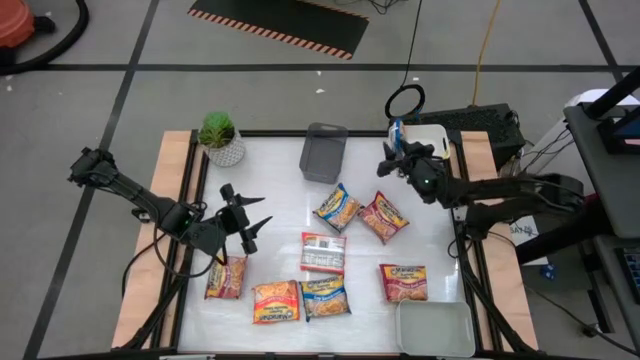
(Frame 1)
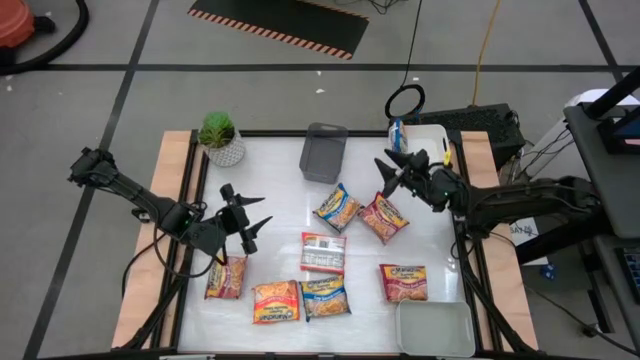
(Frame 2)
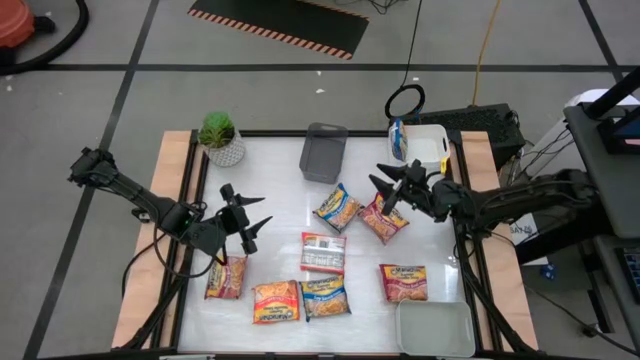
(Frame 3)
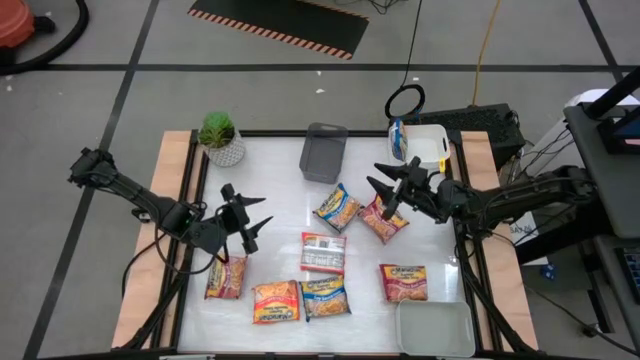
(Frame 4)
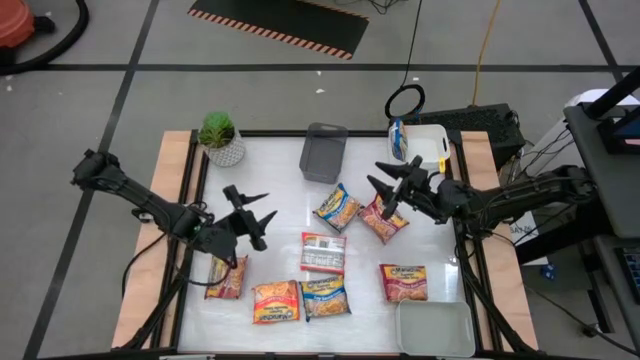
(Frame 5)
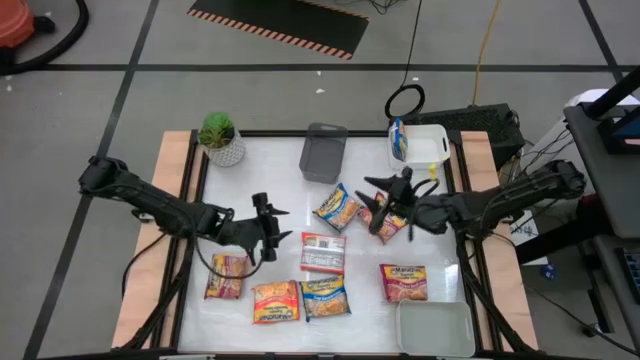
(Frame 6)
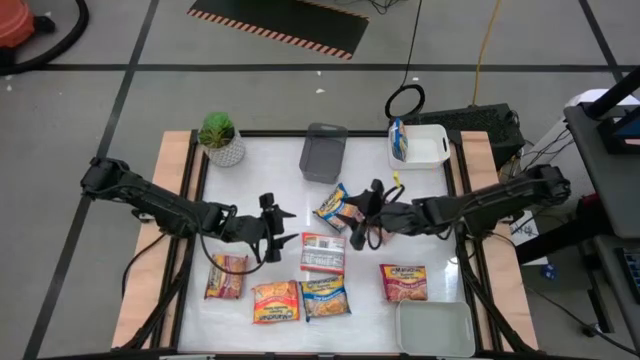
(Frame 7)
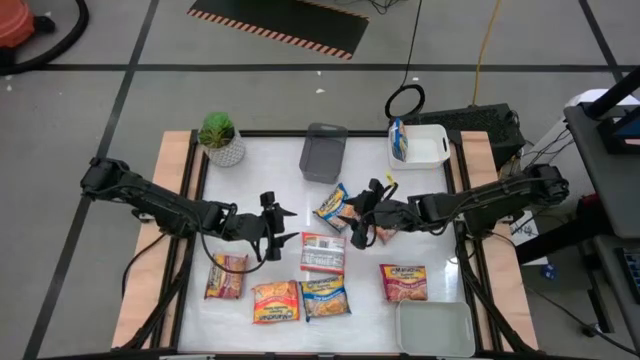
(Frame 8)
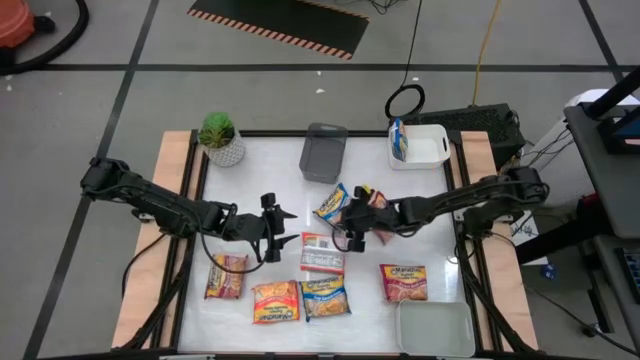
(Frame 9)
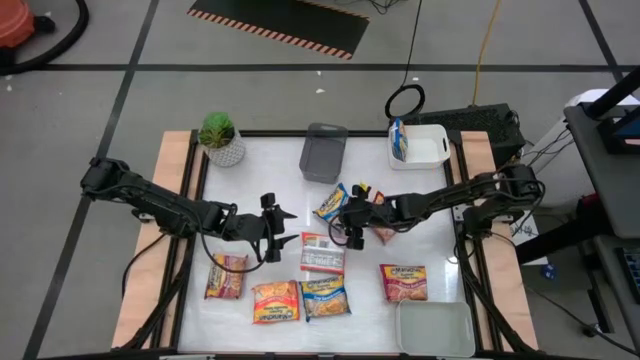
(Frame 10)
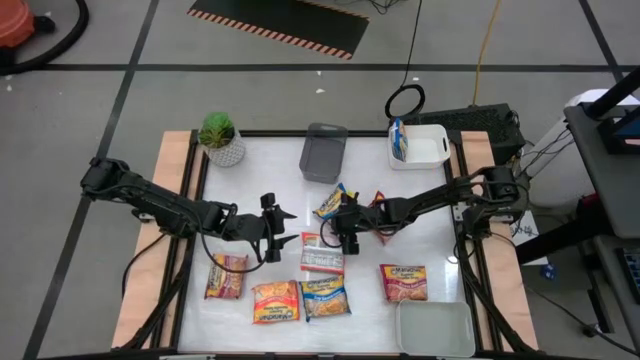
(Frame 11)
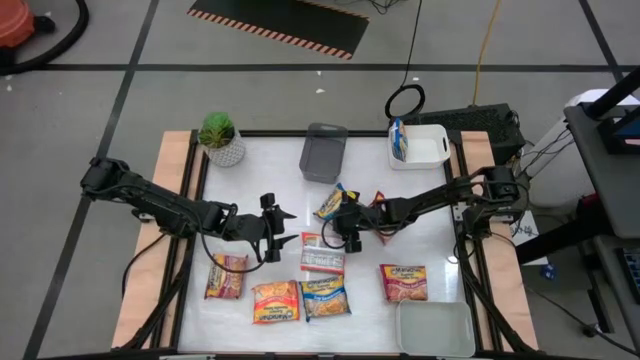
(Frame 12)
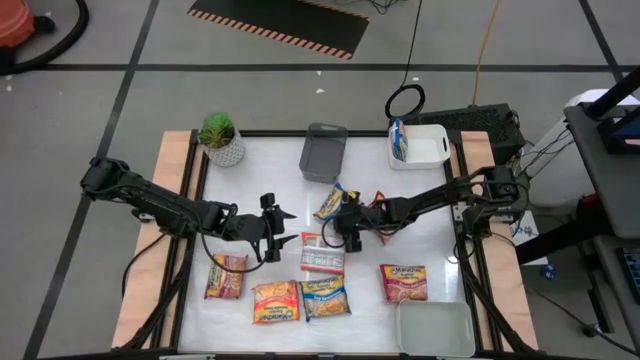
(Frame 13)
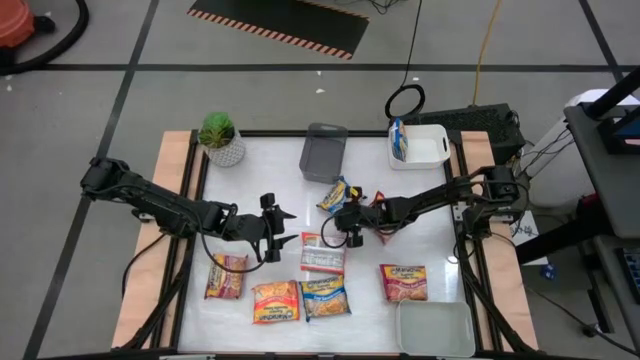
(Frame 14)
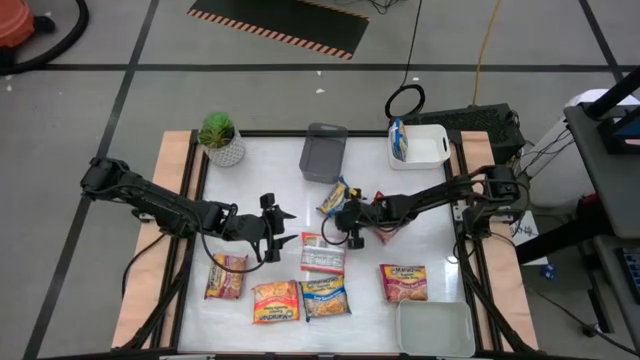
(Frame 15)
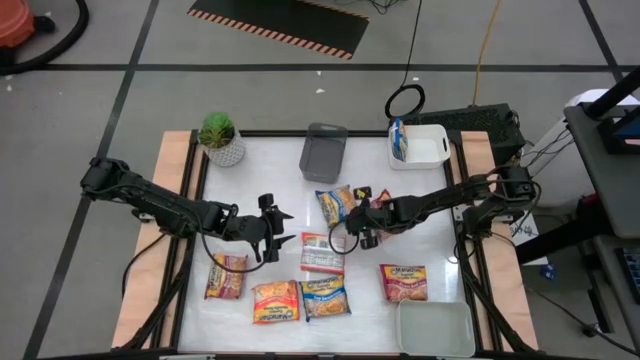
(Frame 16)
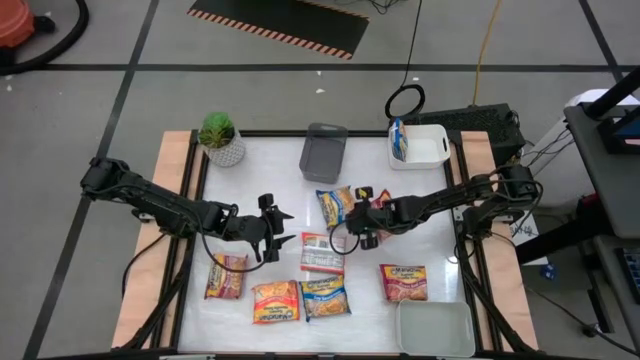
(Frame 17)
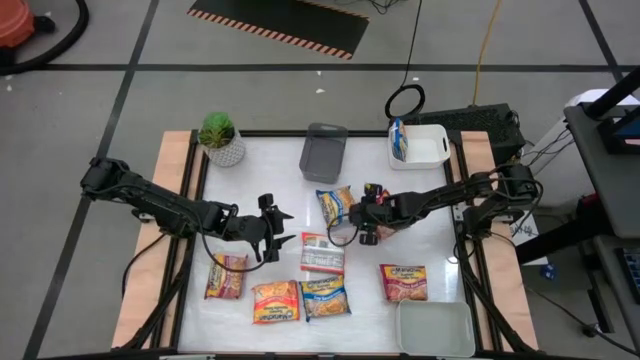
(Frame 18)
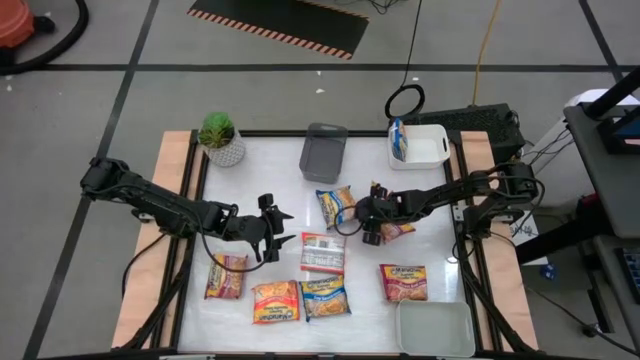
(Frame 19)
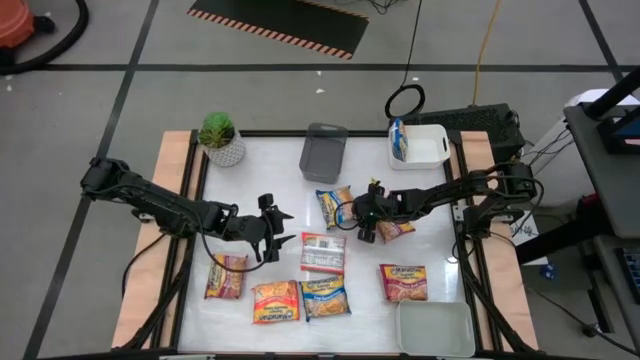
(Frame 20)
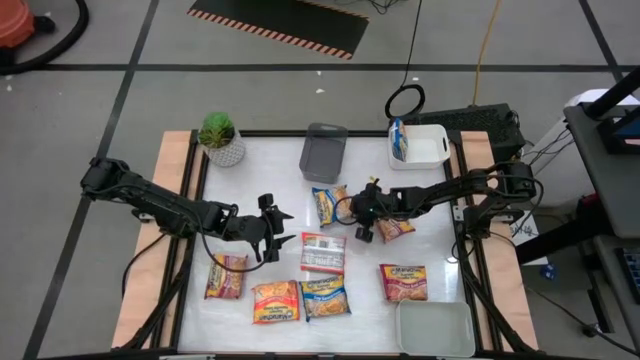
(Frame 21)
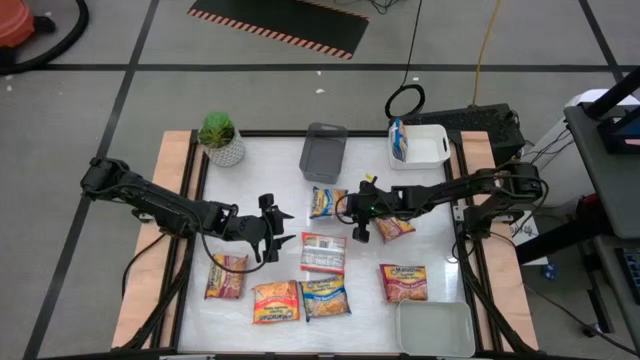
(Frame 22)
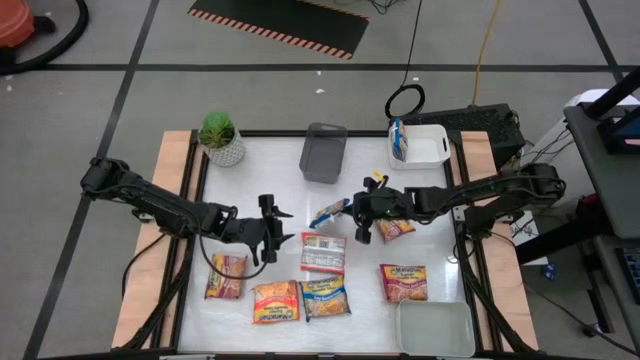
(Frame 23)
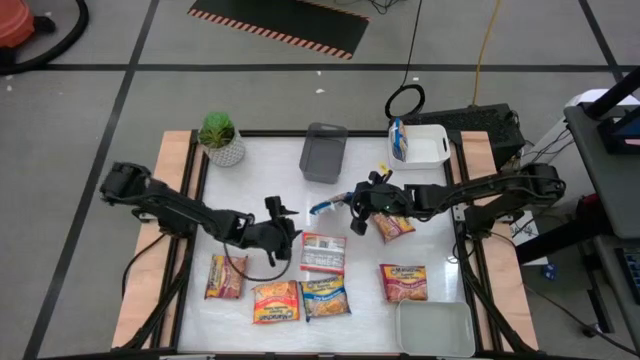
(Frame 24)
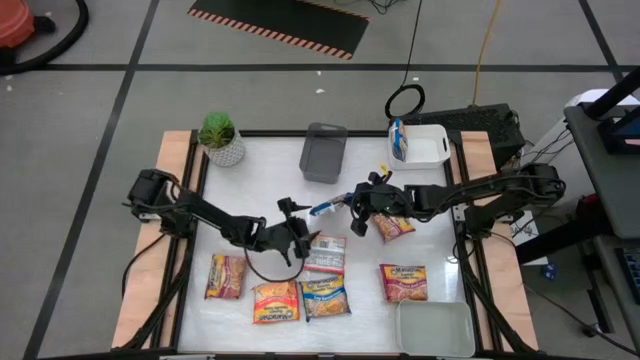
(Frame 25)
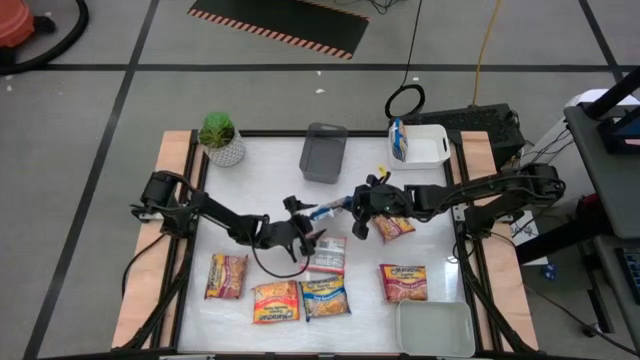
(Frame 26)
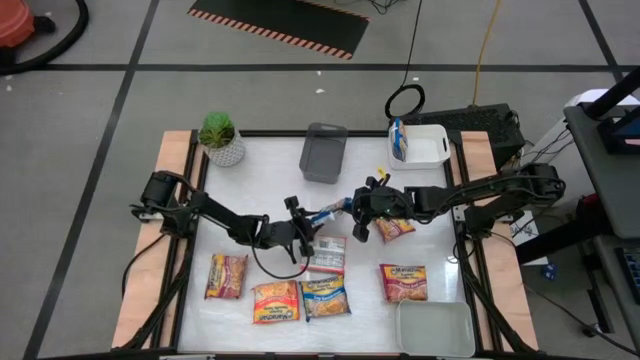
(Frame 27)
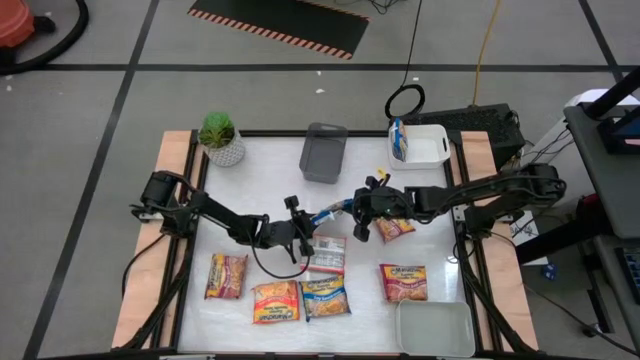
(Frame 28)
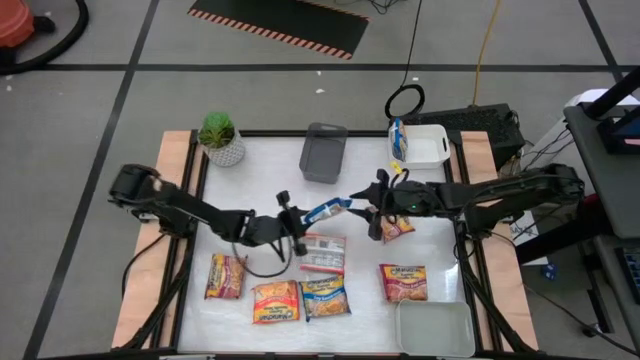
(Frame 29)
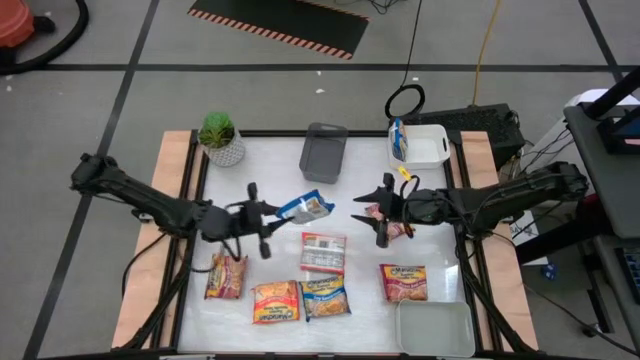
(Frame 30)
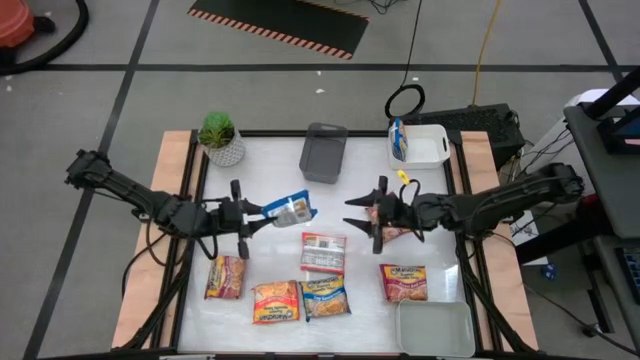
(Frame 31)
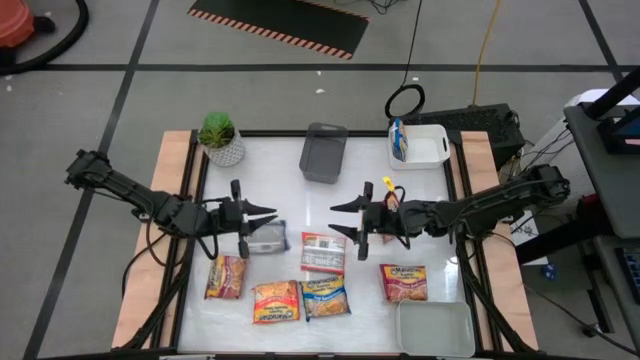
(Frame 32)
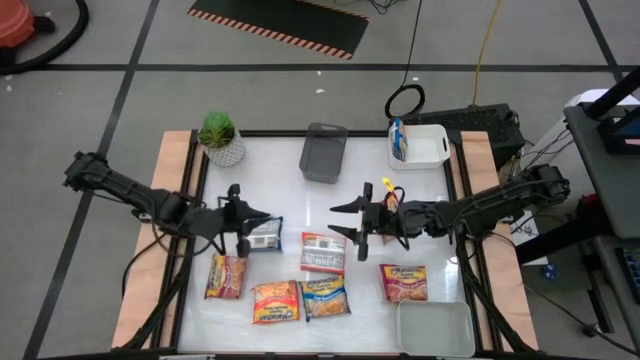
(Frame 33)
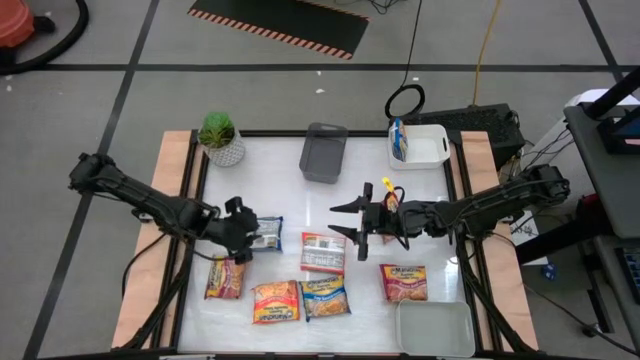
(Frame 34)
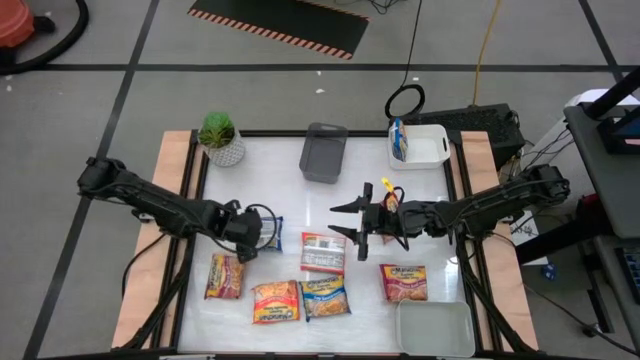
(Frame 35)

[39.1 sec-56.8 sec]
Task: Sort Maruchan noodles
Put the top blue noodle pack into the white bin

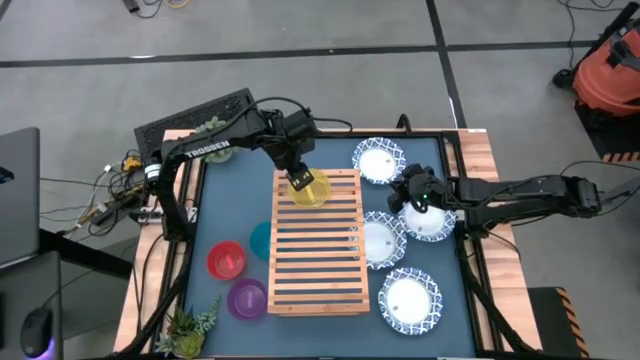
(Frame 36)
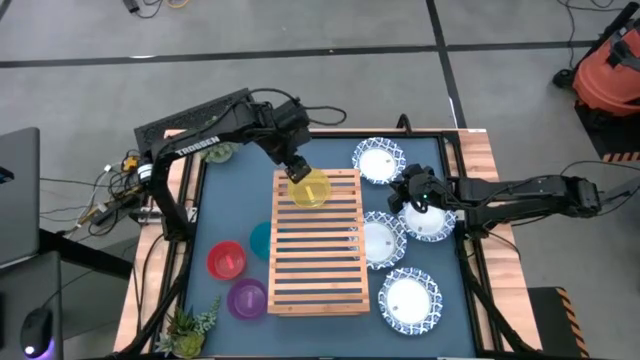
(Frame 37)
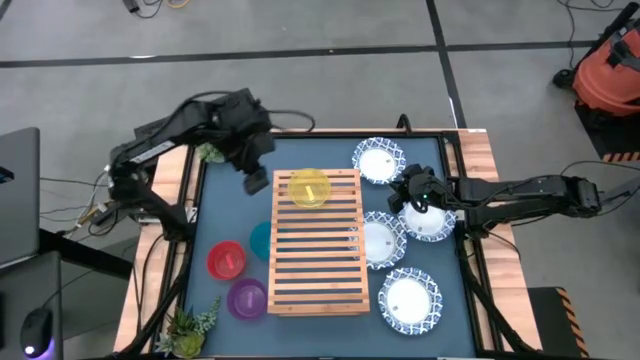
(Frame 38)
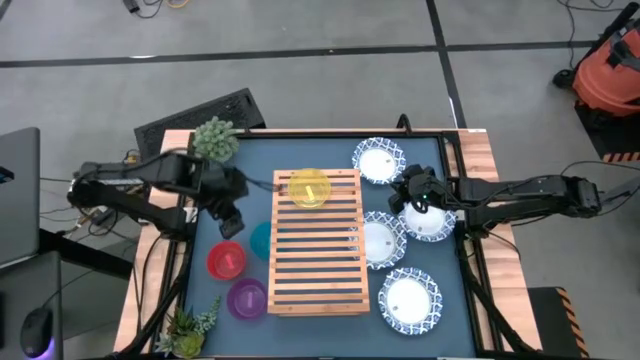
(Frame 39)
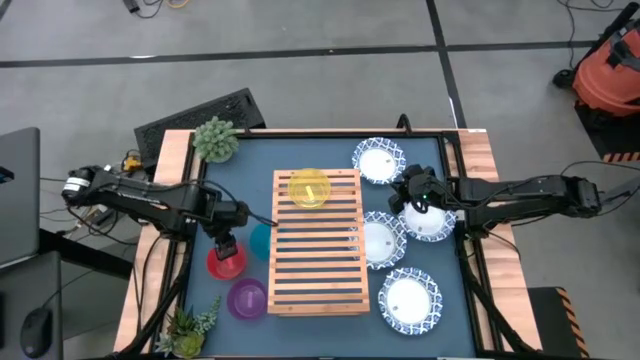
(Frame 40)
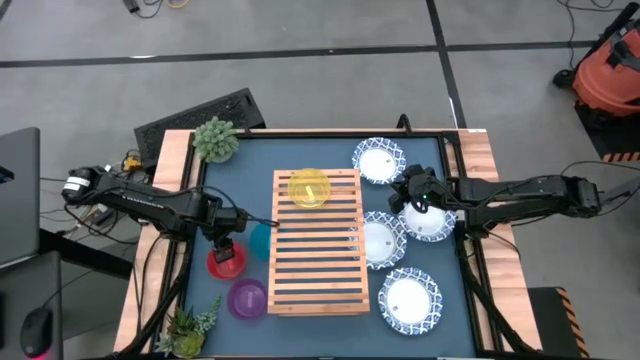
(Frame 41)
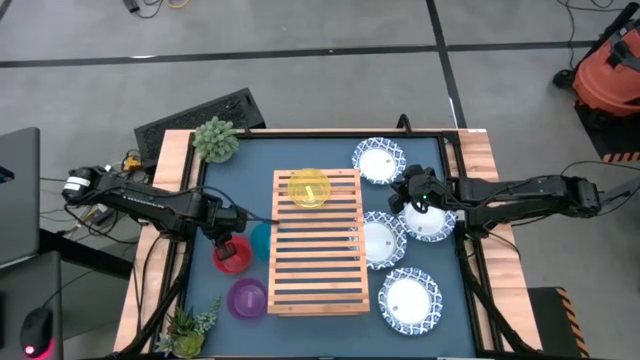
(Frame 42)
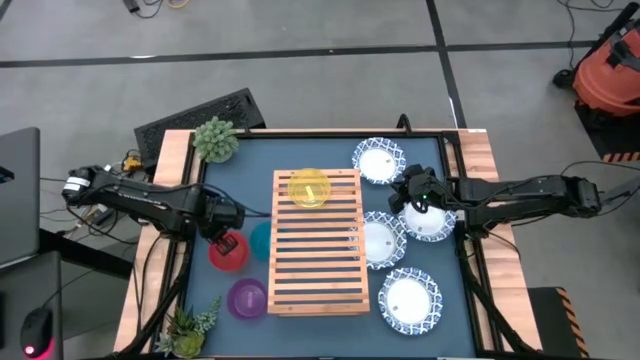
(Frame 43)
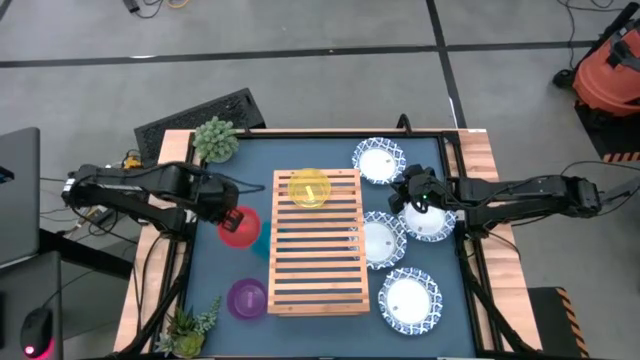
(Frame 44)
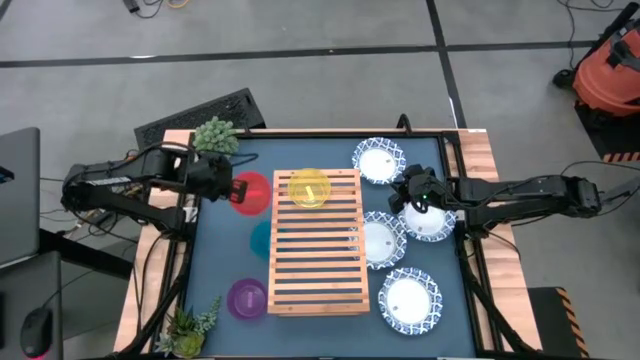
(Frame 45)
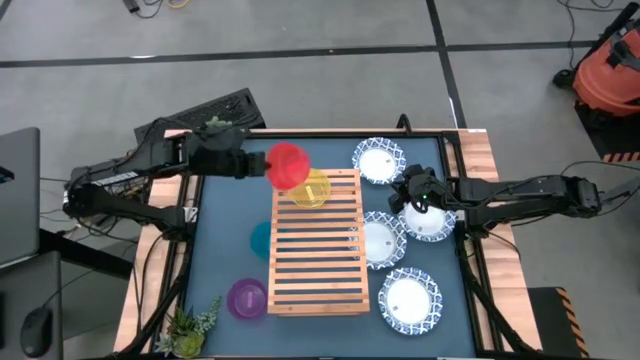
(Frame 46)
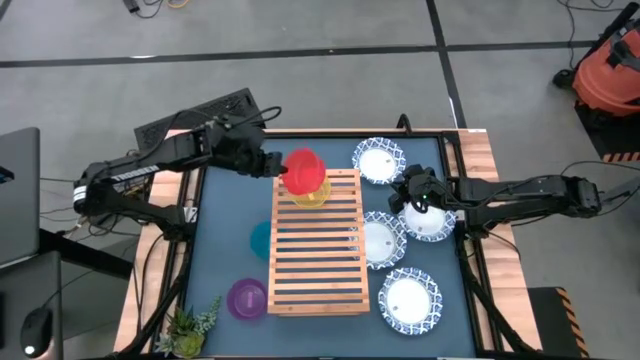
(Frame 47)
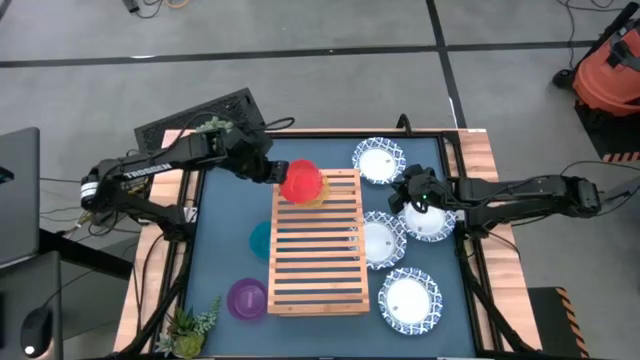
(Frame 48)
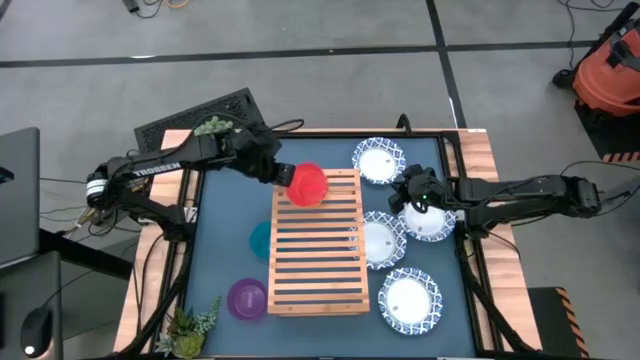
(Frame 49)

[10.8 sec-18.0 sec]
Task: Place and stack bowls onto a shelf
Stack the small orange bowl on top of the small yellow bowl
